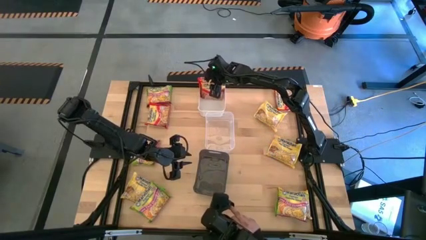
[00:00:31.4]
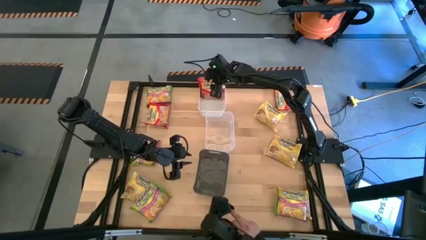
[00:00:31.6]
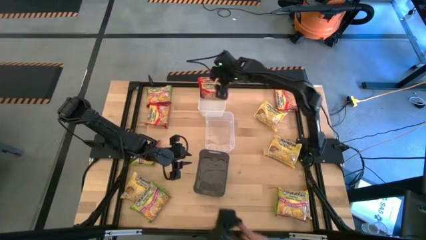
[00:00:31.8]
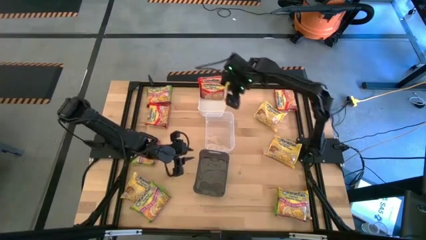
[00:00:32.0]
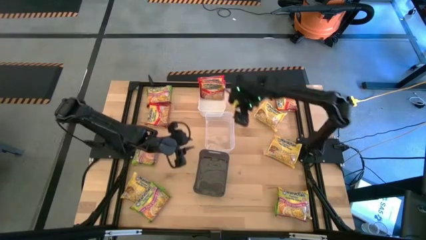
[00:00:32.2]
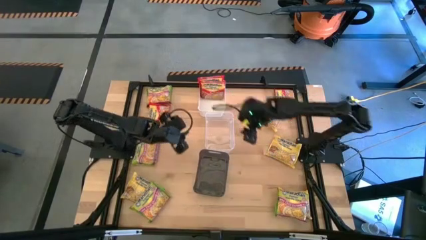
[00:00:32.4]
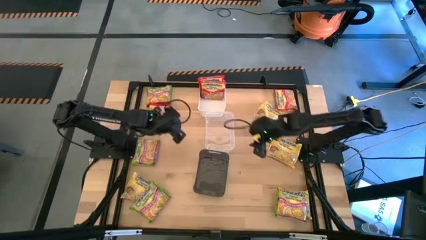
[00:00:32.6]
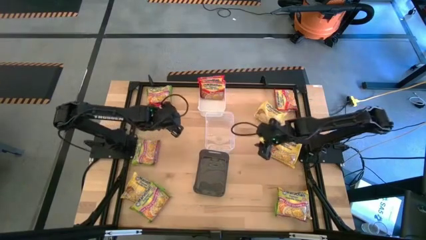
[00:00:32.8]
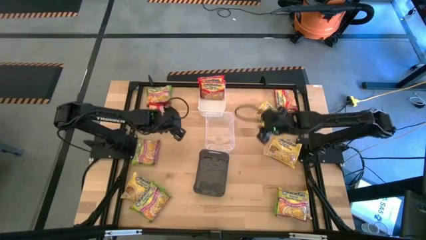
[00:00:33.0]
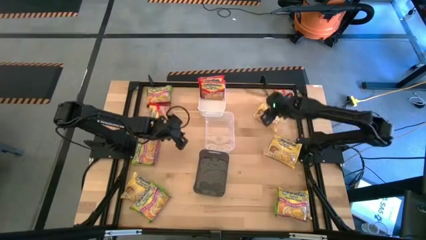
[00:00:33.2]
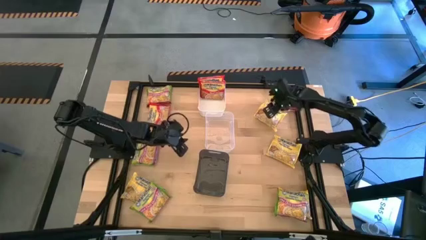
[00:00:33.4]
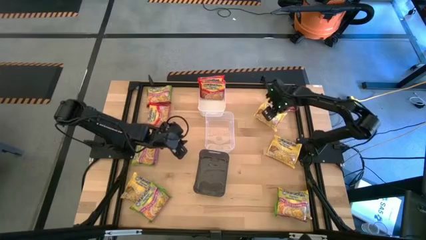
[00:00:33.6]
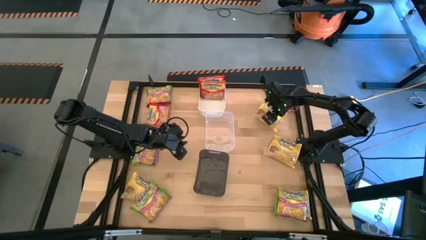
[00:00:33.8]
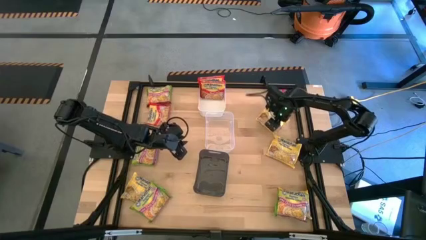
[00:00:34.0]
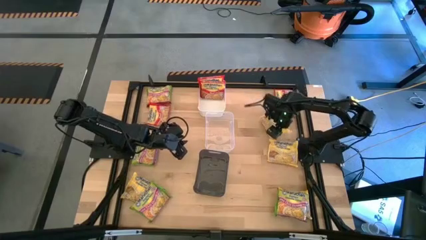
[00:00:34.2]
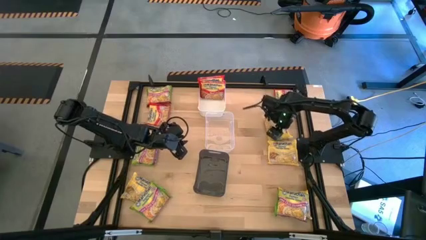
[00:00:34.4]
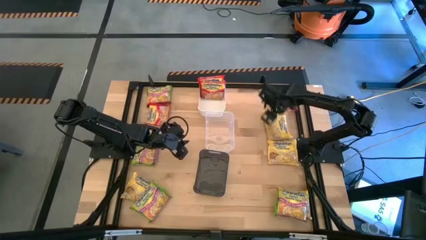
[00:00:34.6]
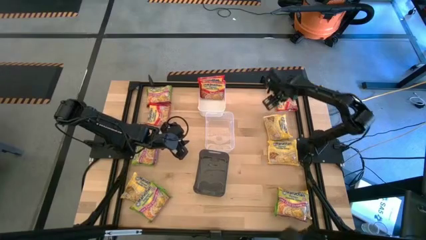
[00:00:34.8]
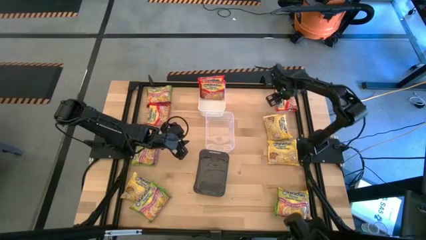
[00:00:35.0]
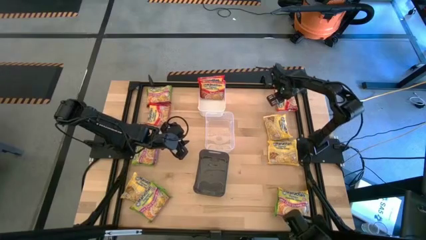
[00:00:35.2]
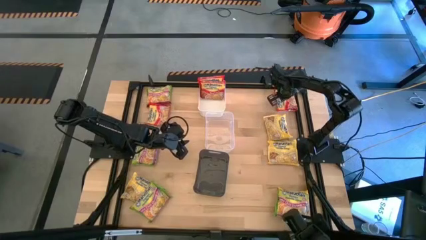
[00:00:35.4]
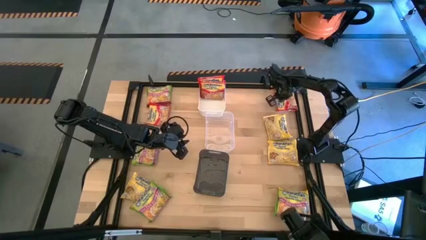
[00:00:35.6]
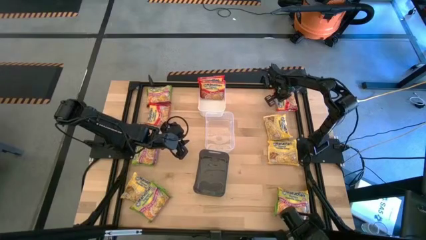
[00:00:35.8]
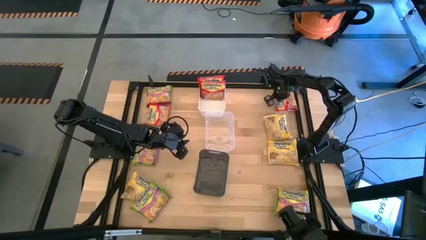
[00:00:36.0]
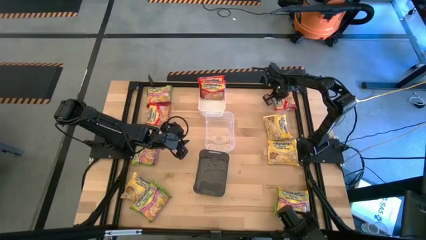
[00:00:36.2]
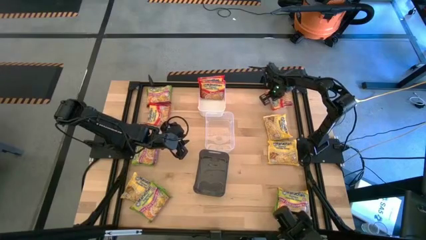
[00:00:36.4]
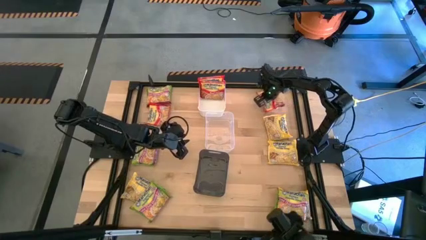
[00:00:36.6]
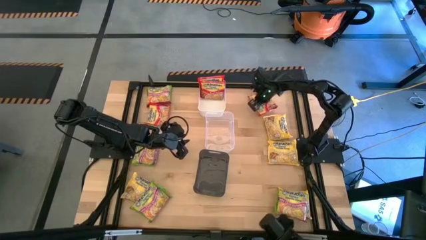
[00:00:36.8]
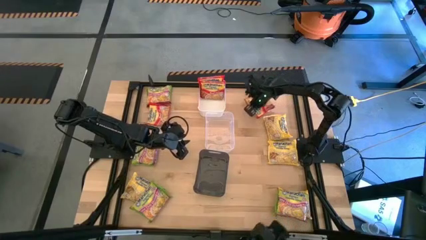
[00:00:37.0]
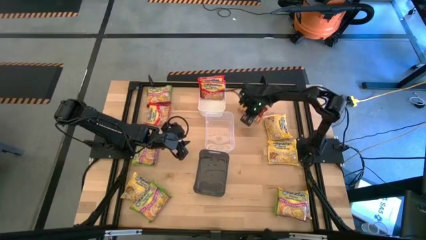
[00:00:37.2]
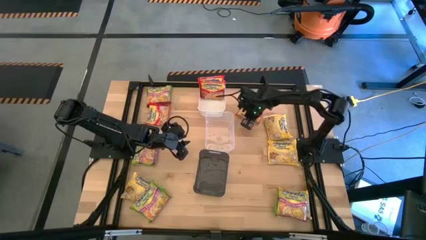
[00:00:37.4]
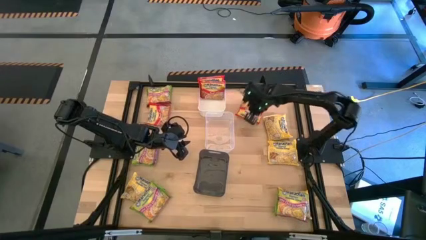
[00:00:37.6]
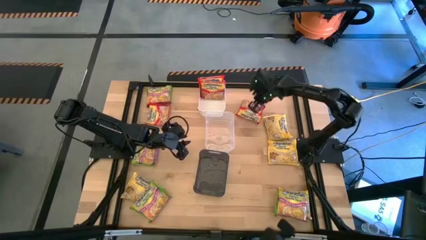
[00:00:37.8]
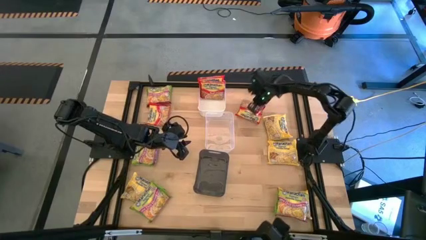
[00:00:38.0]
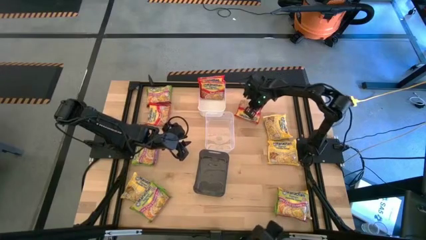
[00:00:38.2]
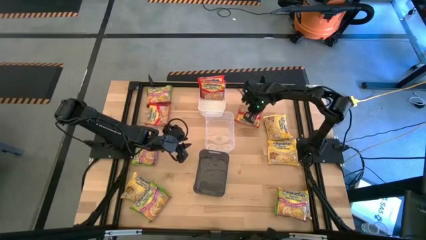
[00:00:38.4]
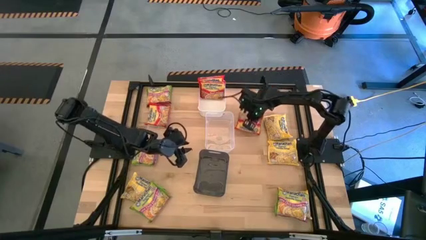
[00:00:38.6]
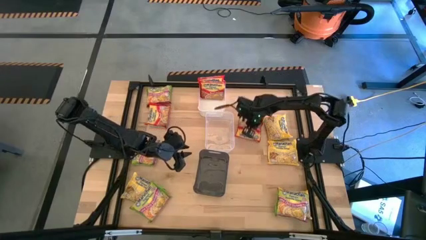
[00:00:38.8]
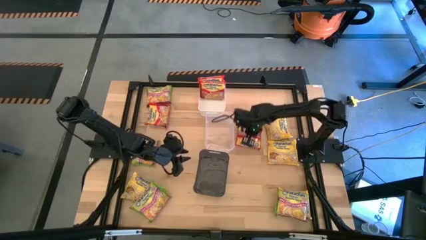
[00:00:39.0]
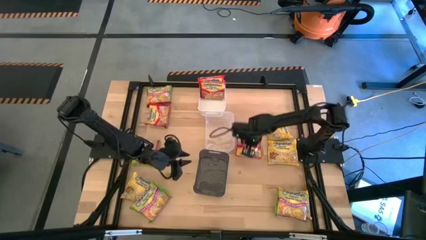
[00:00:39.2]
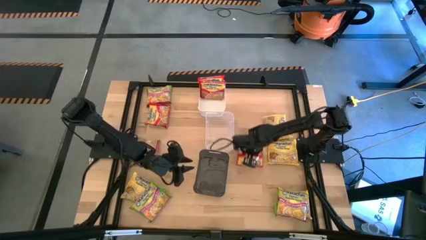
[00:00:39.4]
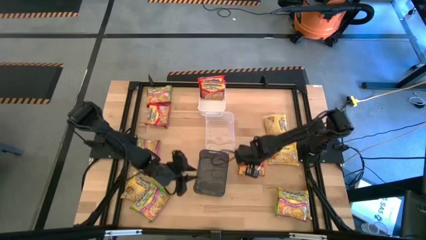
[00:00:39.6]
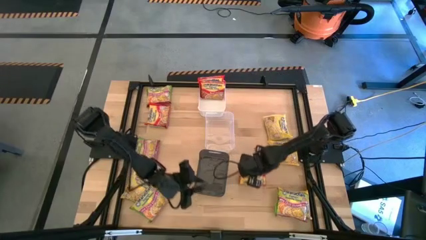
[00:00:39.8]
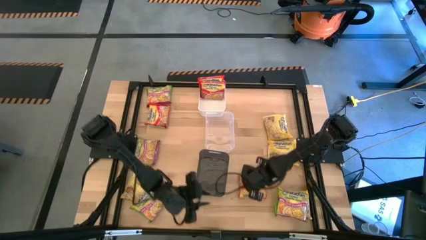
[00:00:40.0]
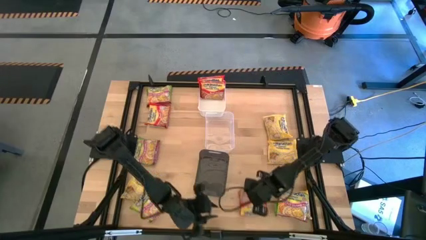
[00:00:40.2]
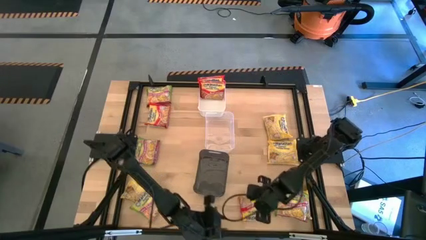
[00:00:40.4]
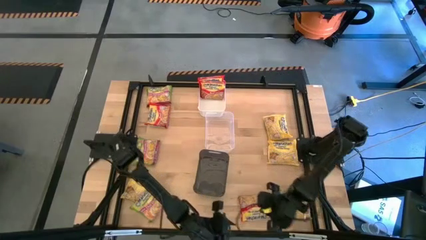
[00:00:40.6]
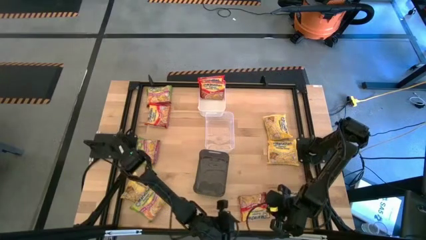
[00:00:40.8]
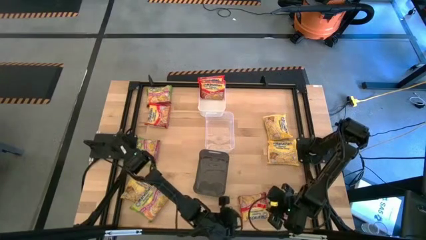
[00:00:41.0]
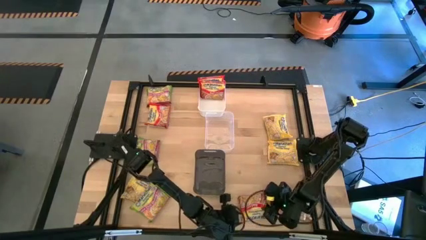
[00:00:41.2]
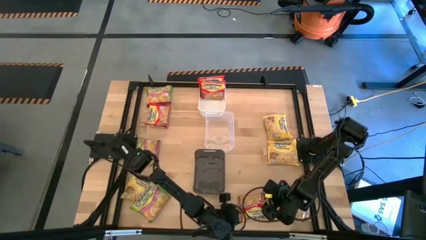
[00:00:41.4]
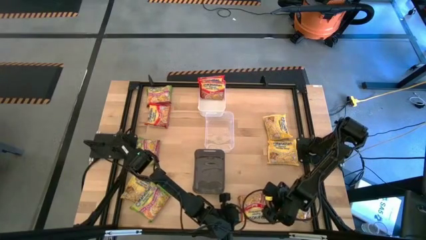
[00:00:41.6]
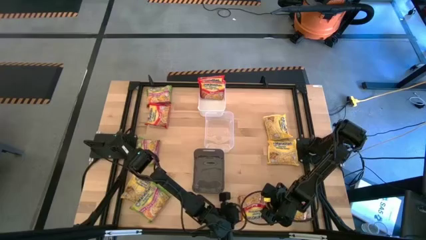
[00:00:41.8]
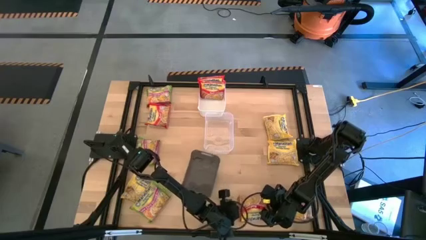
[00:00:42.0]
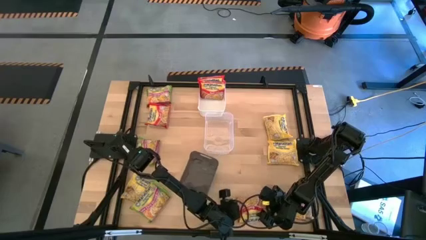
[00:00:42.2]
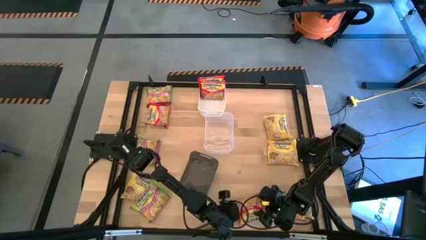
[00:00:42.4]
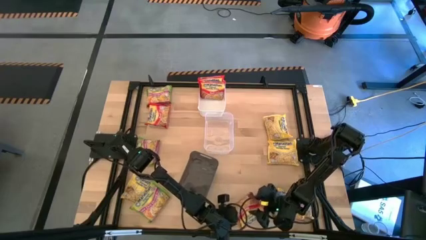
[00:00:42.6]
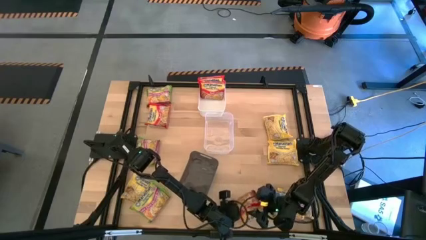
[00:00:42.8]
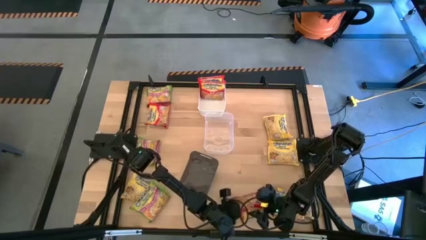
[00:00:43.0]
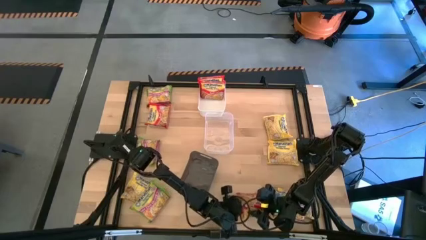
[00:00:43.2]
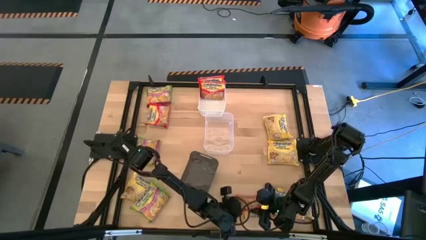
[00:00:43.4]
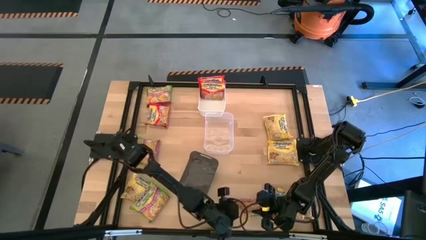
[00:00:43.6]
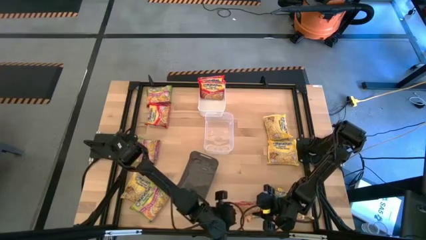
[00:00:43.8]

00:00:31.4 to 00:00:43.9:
Task: Sort Maruchan noodles
Put the red noodle pack into the white bin
